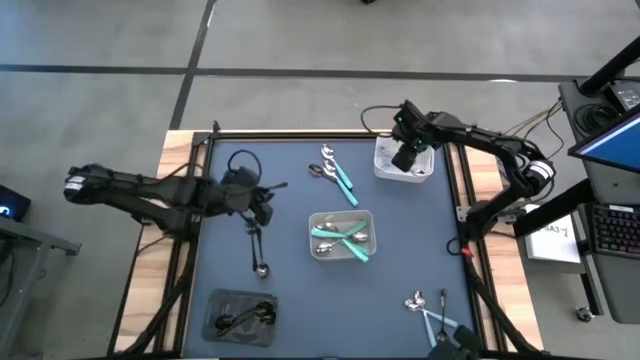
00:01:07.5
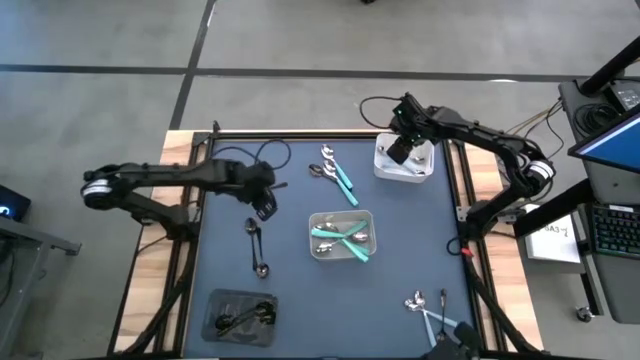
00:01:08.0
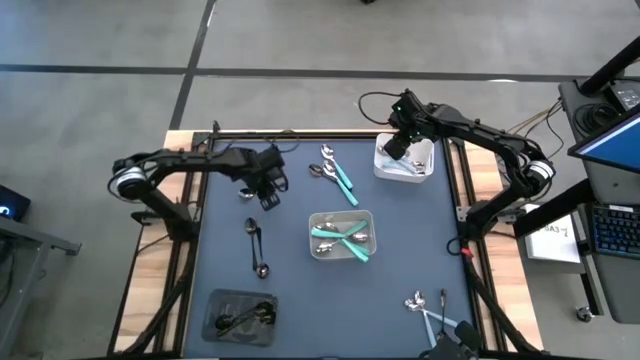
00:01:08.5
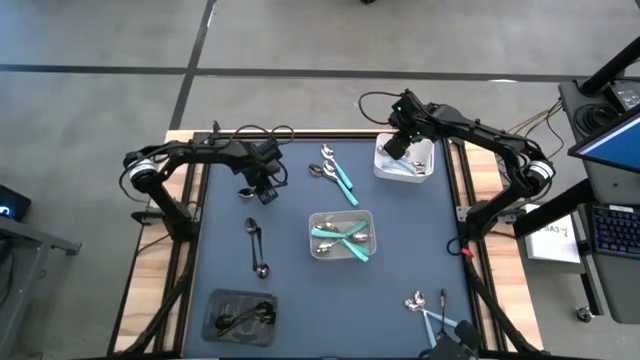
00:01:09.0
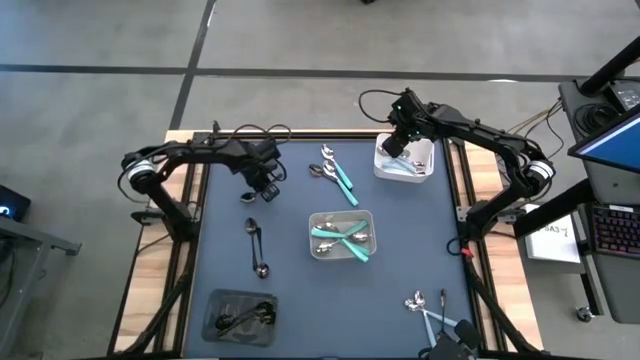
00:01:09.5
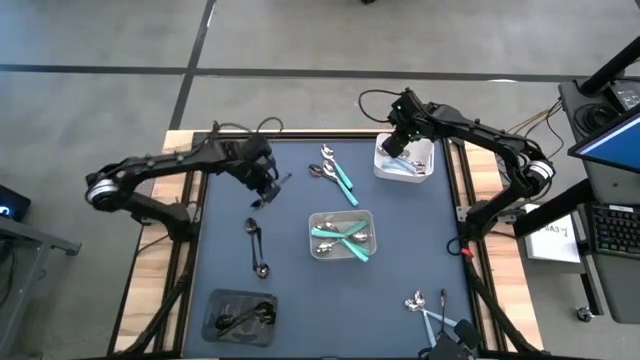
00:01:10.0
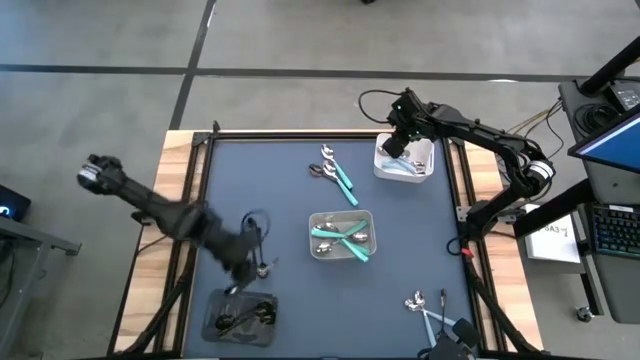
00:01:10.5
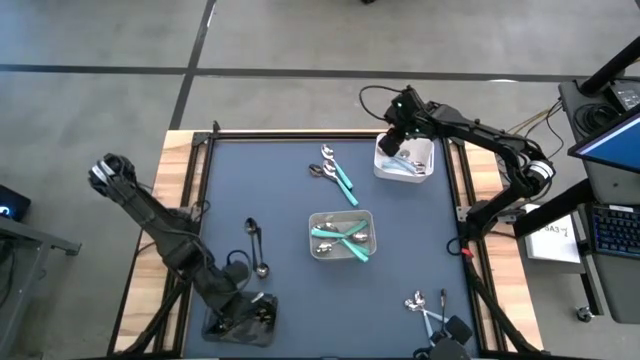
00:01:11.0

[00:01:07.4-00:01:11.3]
Task: Sort silverware by color (type)
Put the black spoon into the black bin

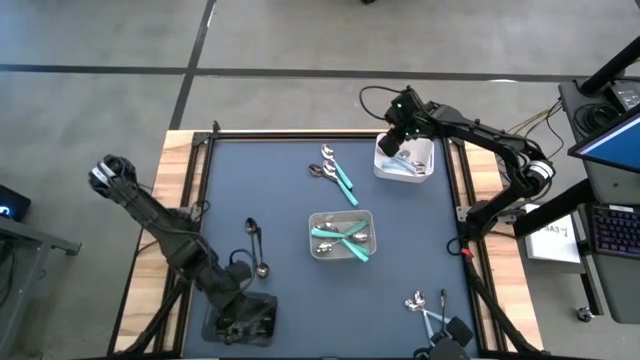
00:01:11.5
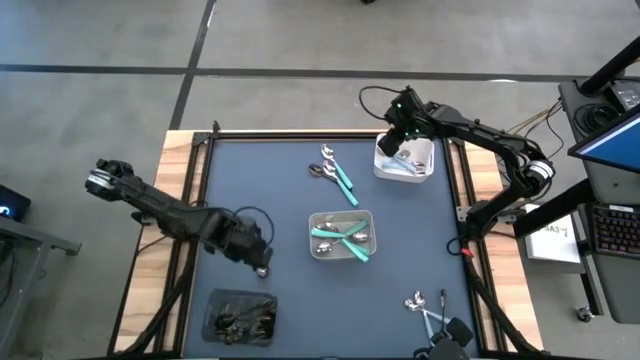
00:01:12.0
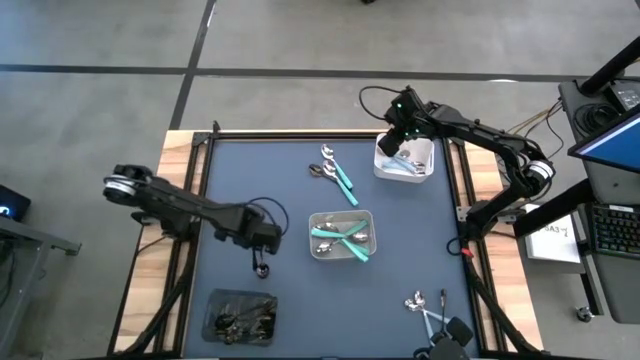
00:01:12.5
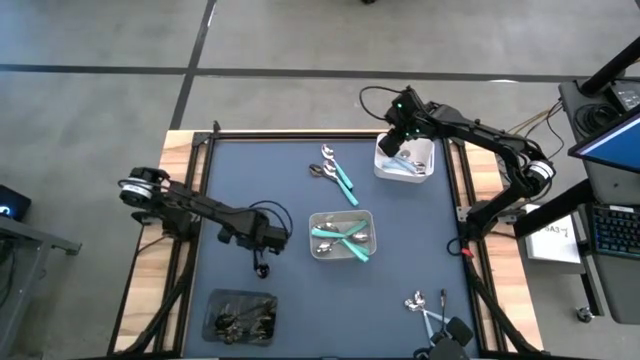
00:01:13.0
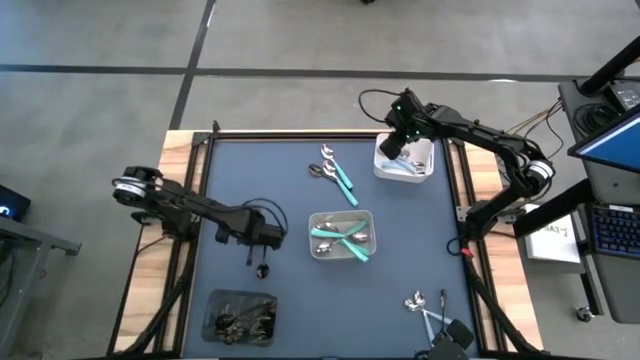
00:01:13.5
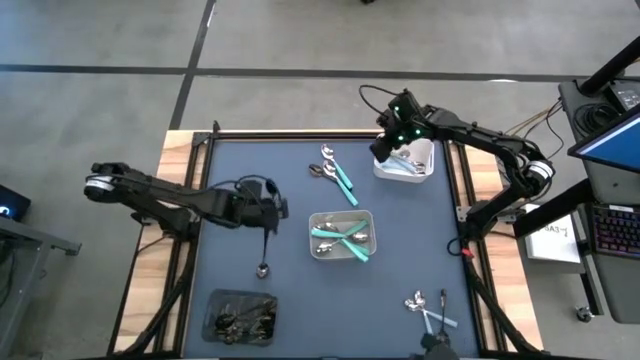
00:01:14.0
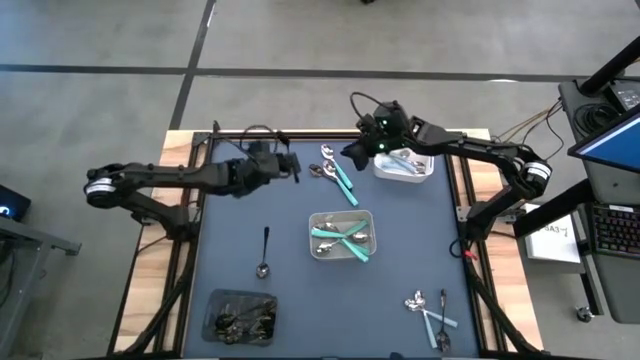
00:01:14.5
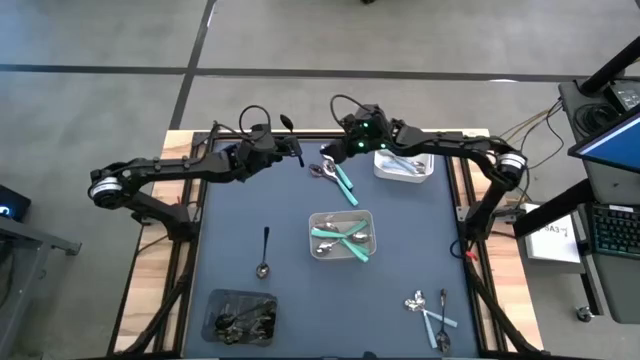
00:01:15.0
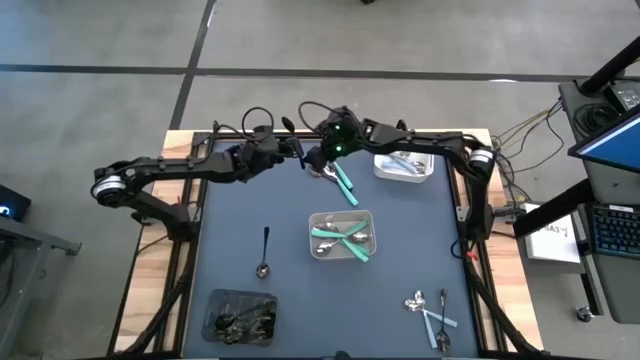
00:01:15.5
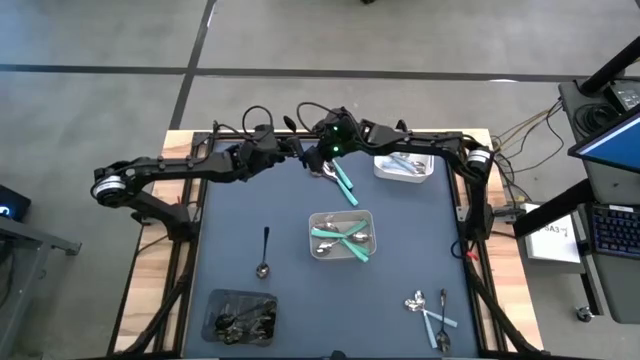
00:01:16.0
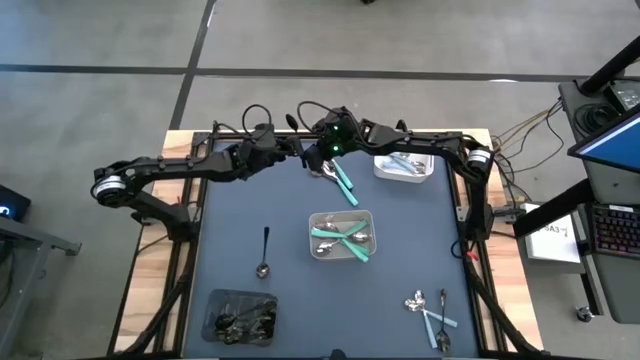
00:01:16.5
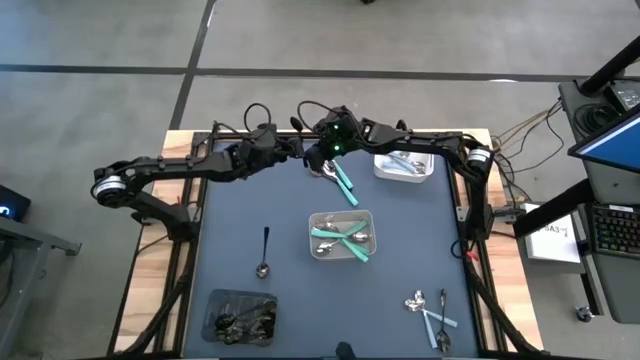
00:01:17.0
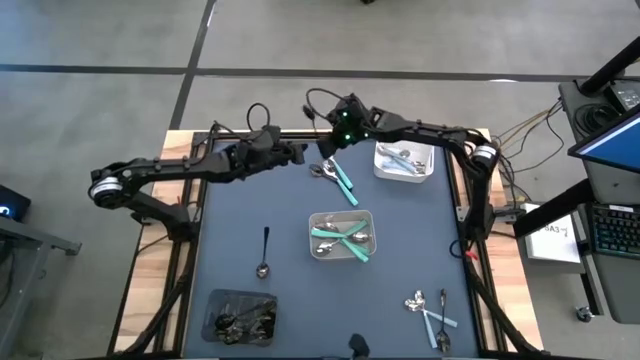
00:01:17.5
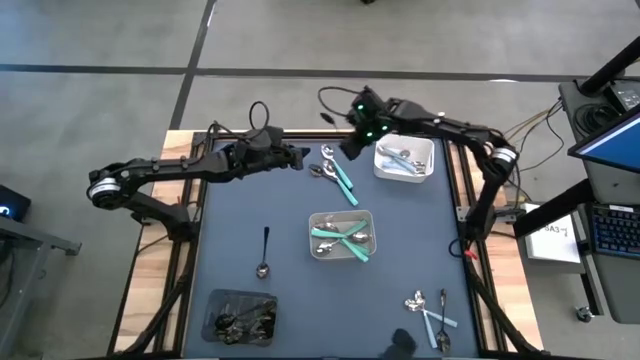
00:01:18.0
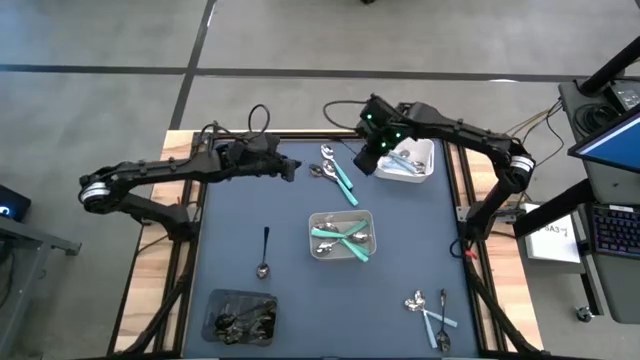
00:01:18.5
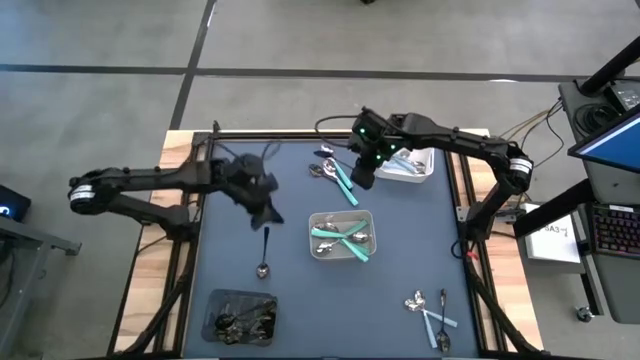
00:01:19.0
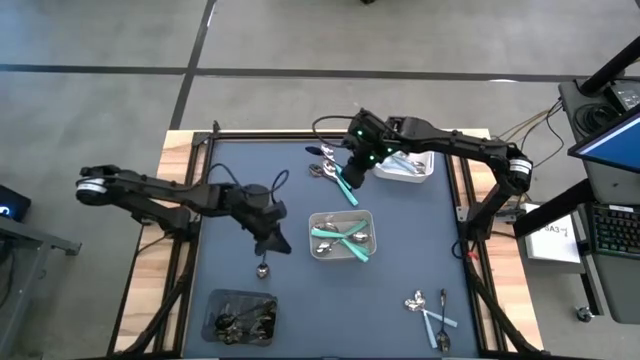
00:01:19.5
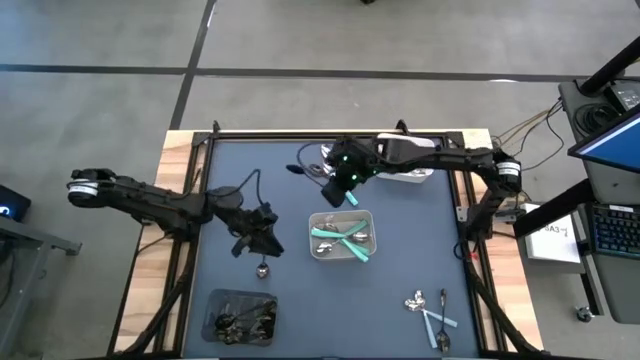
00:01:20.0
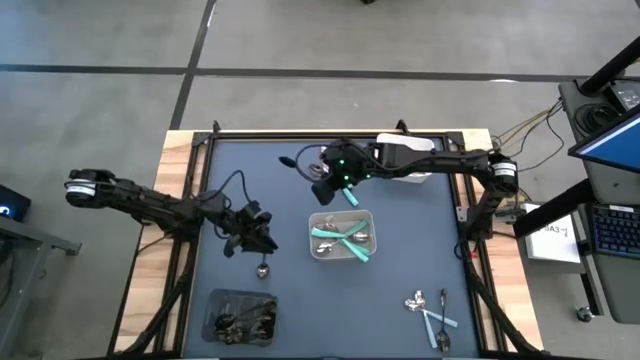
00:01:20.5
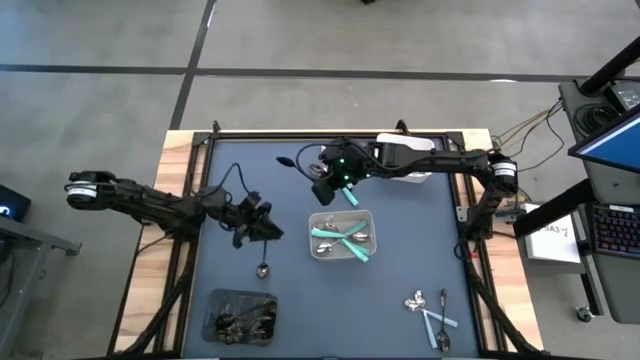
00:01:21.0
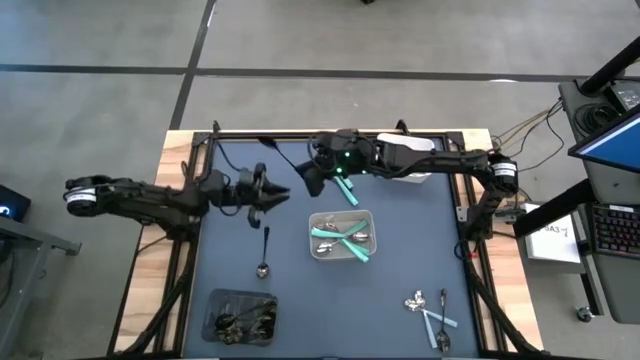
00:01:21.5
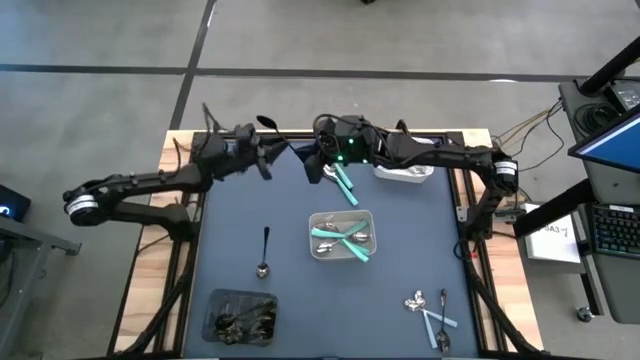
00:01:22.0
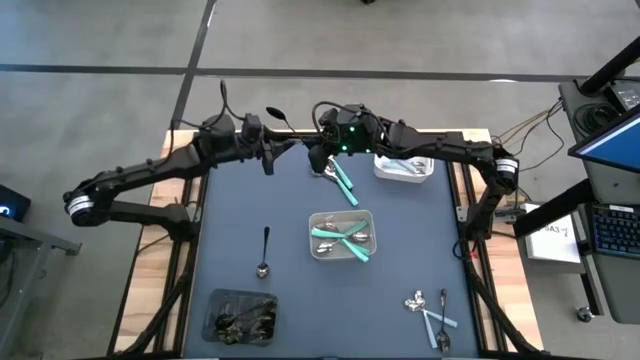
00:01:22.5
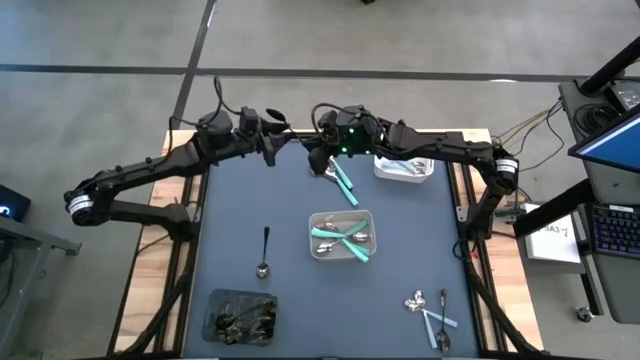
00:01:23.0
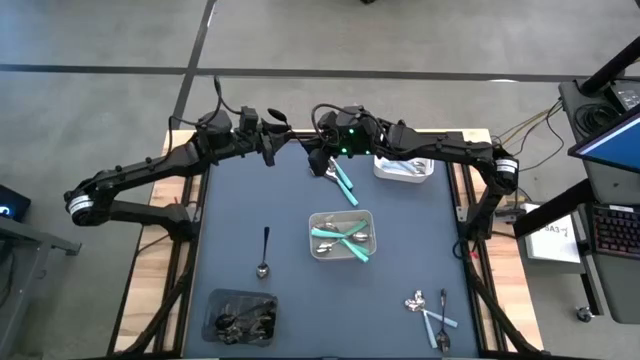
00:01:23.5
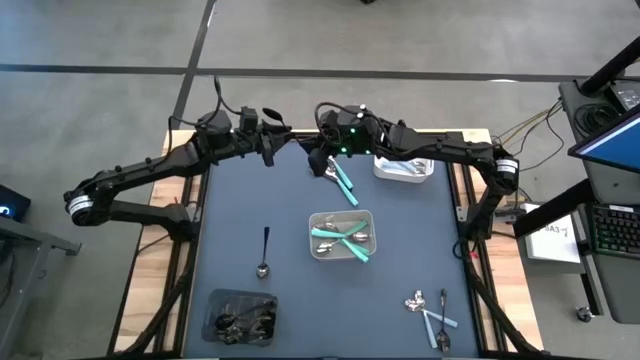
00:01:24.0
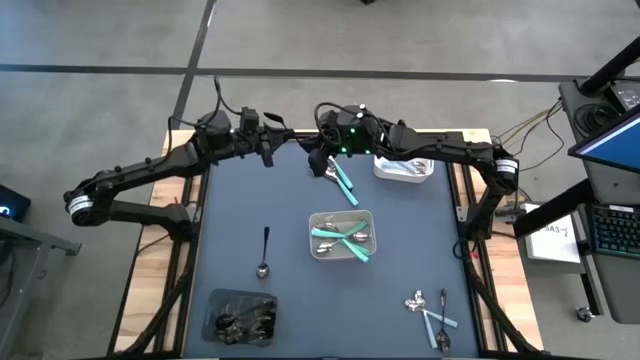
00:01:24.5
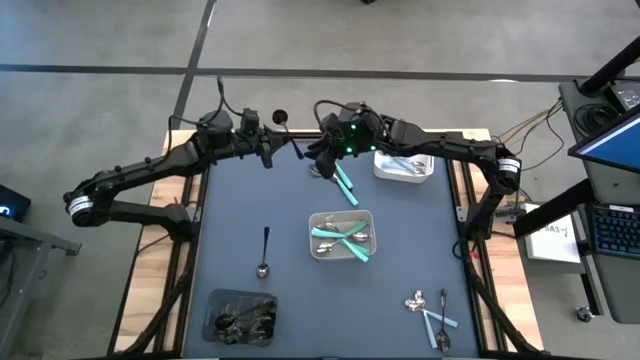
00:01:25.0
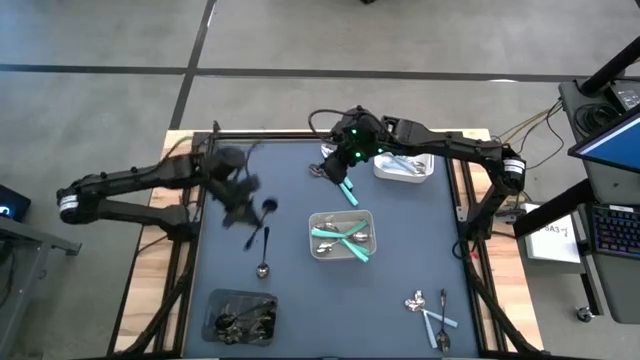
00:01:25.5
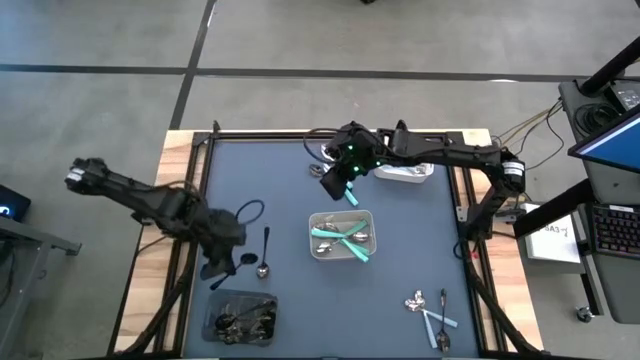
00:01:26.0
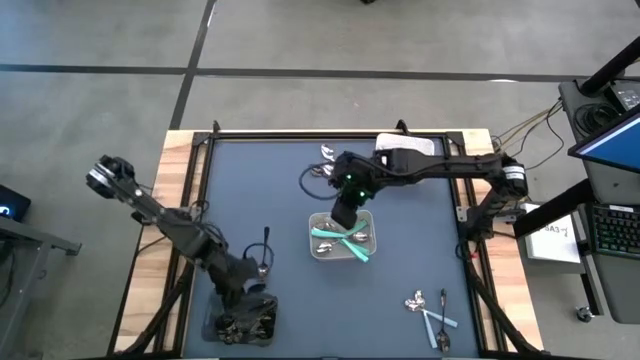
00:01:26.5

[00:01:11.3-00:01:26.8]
Put the black spoon into the black bin

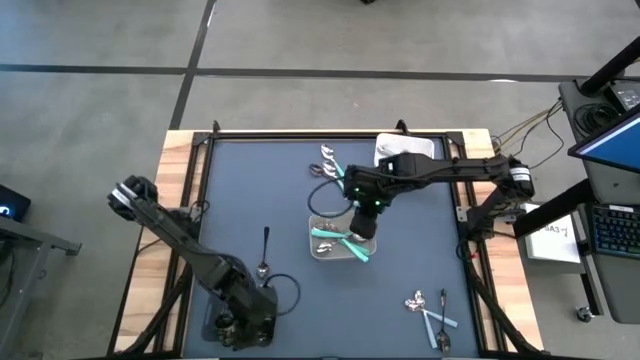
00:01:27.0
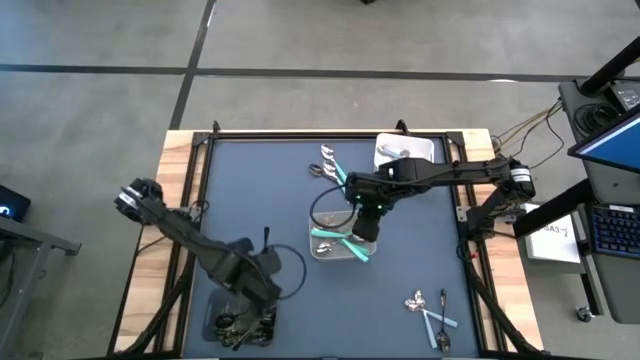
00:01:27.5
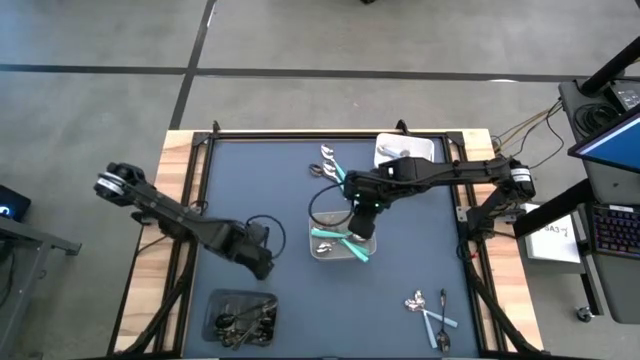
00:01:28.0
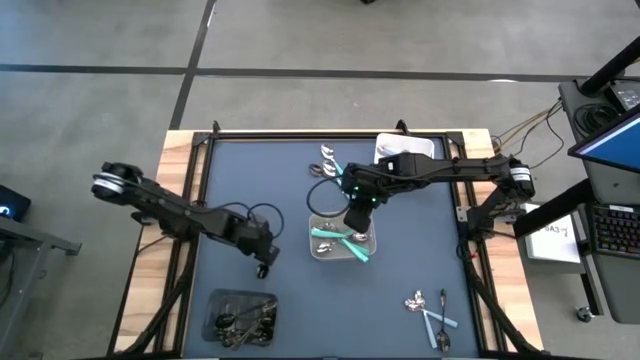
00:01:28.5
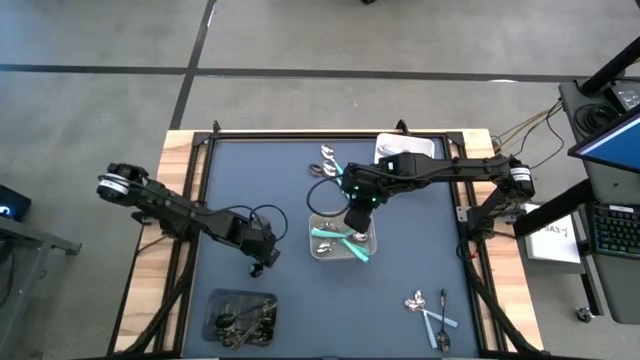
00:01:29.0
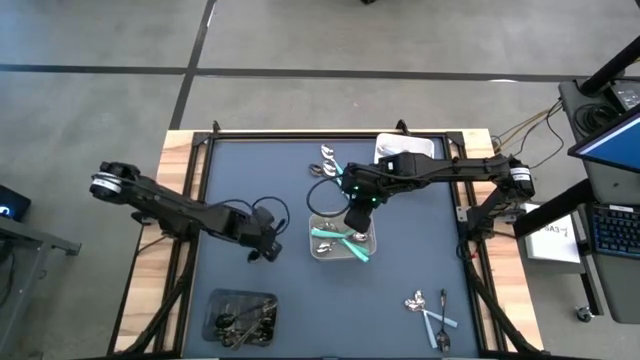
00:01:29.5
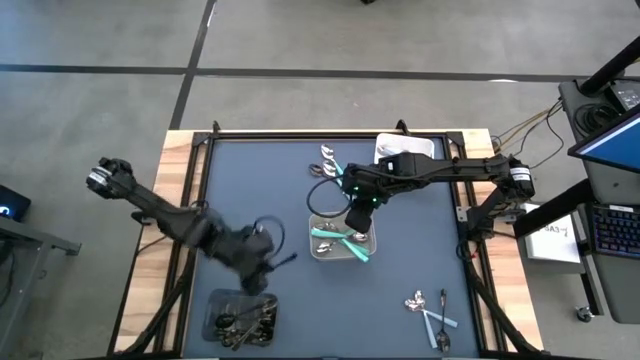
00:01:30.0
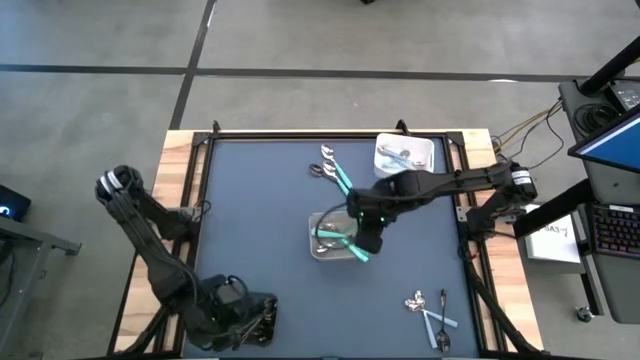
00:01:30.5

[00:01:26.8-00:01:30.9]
Put the black spoon into the black bin
